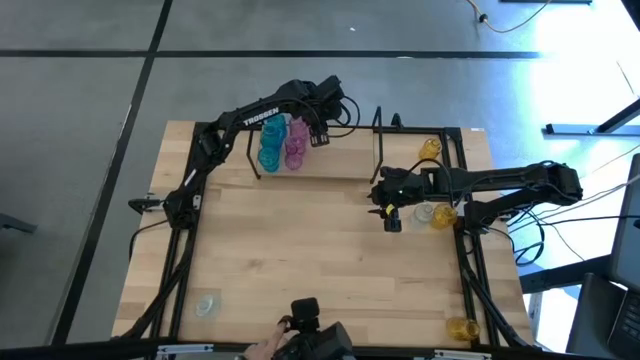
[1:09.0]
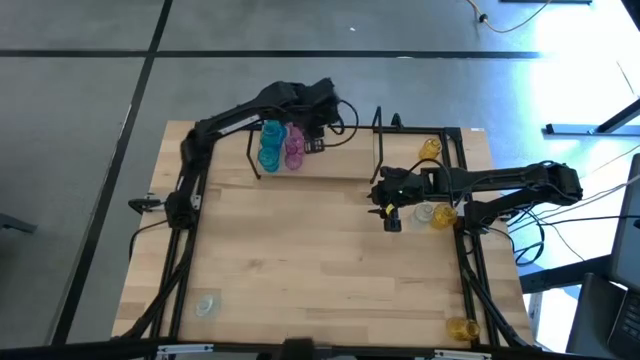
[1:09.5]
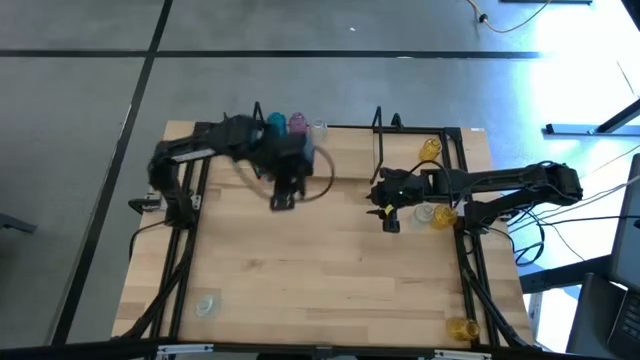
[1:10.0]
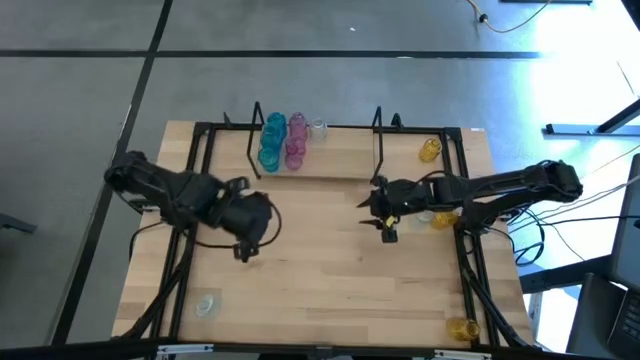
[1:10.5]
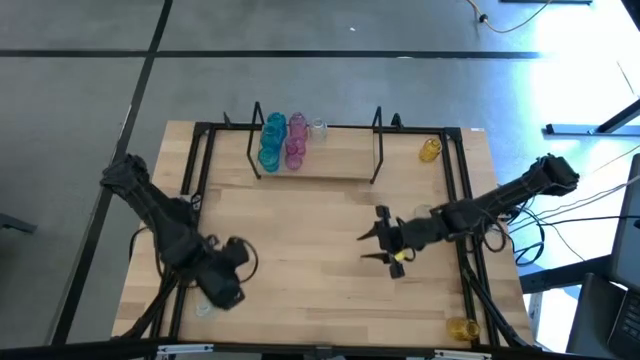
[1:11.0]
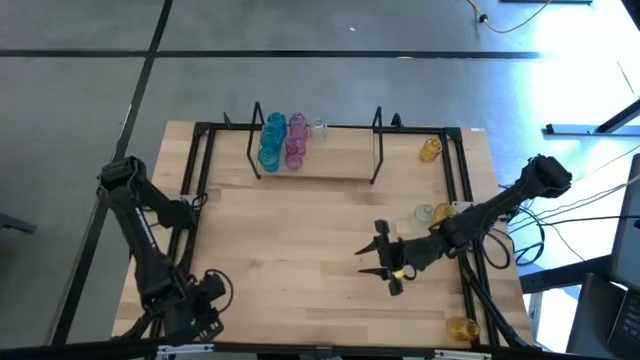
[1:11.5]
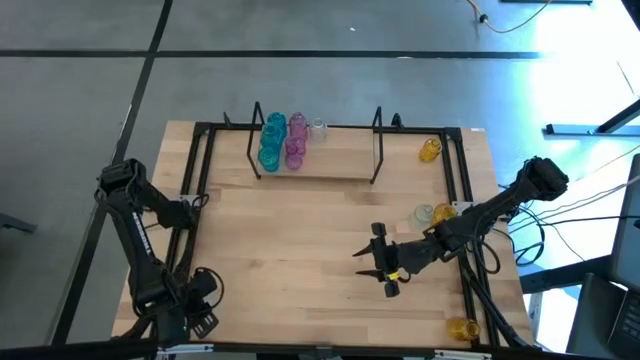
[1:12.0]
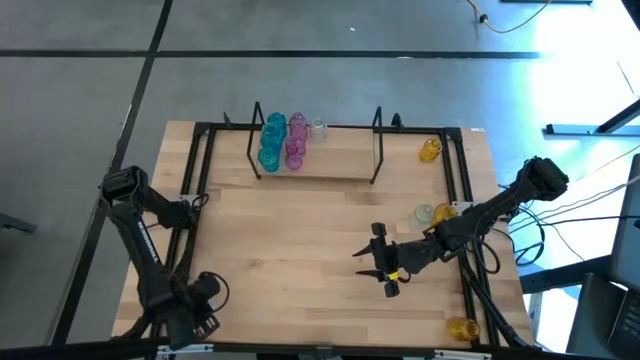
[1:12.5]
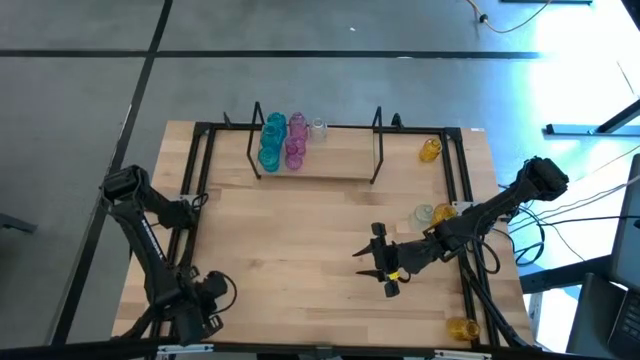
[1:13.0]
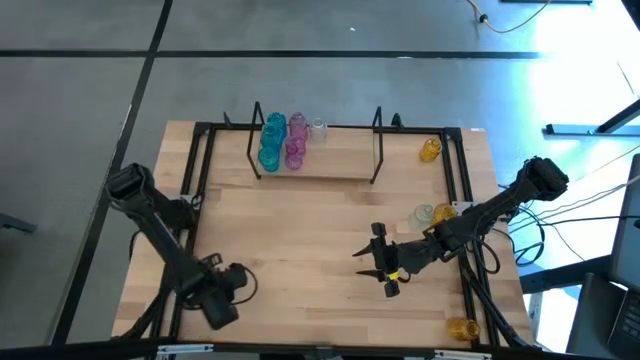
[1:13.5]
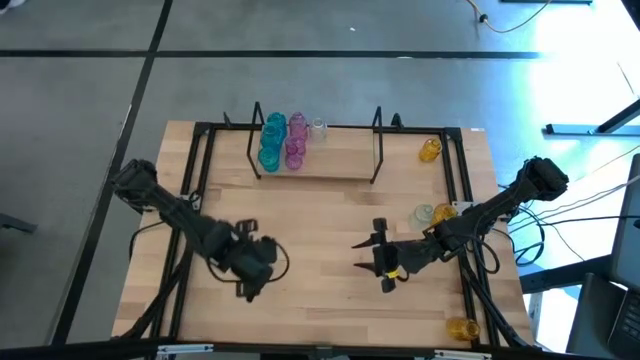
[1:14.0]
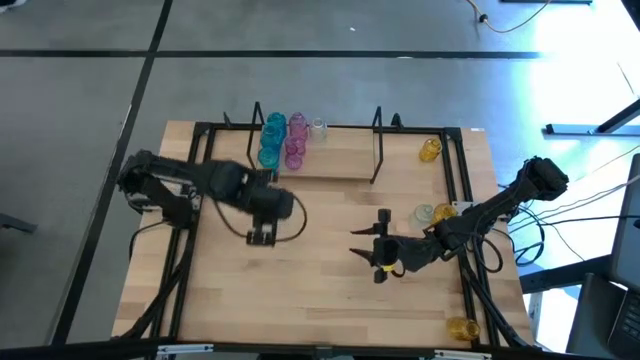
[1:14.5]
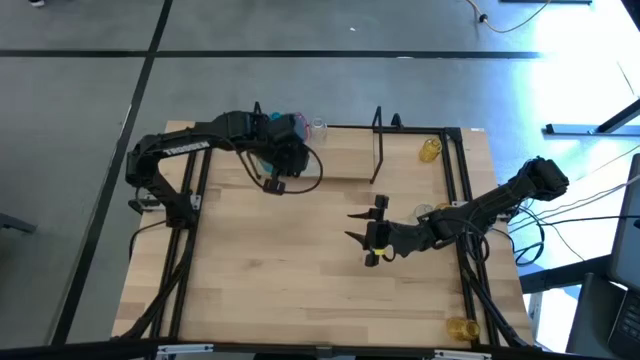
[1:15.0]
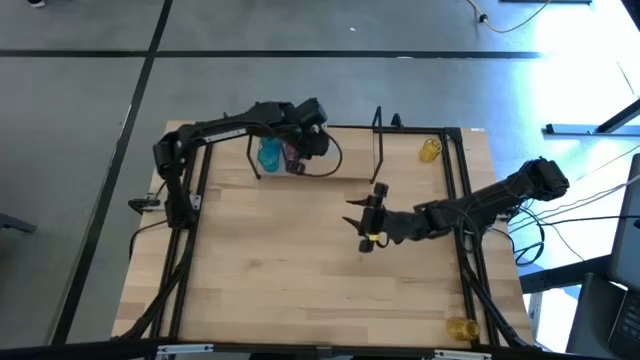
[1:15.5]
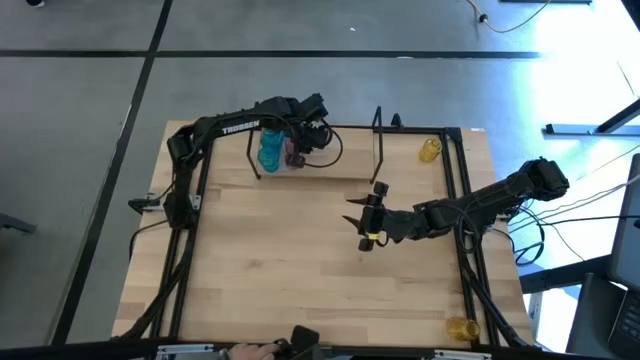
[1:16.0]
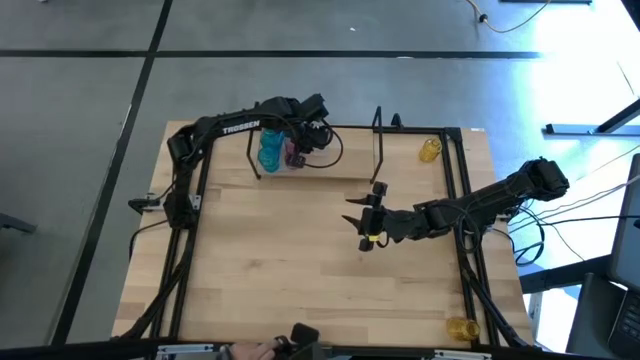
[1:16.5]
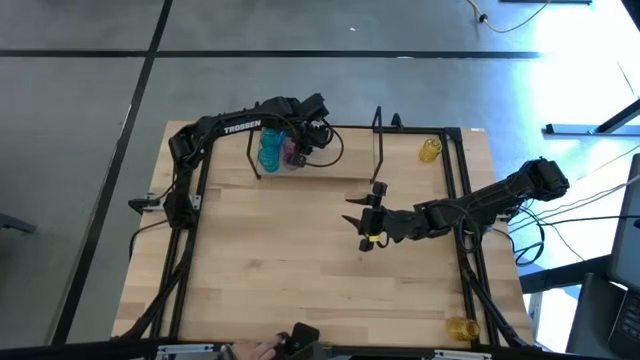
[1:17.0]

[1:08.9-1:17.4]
Task: sort vases onto shelf
Put the bottom transparent vase on the shelf aligned with the other transparent vase

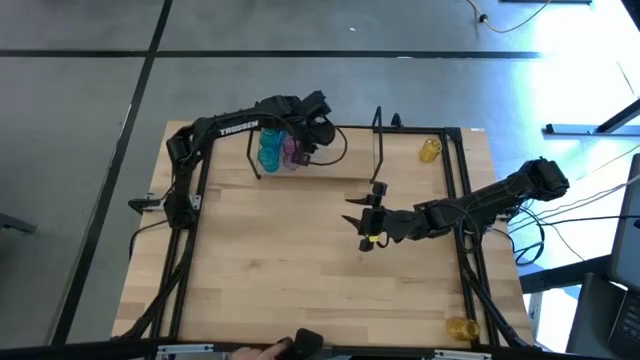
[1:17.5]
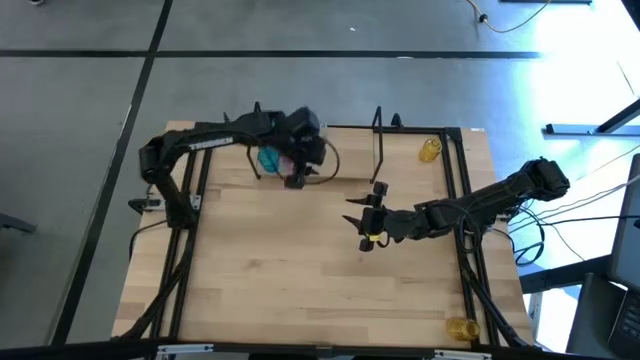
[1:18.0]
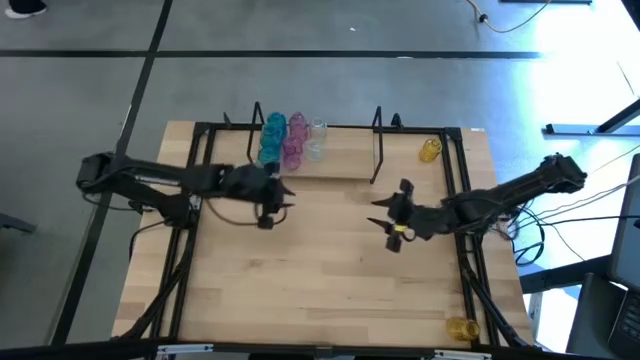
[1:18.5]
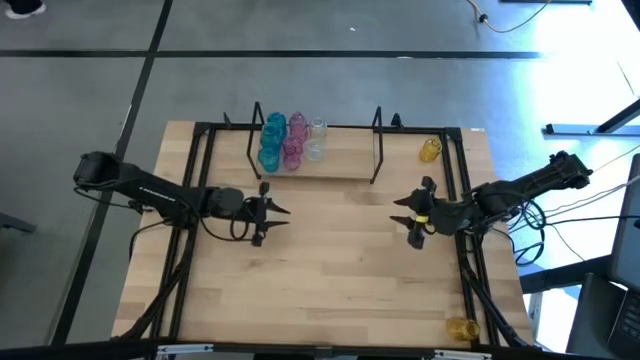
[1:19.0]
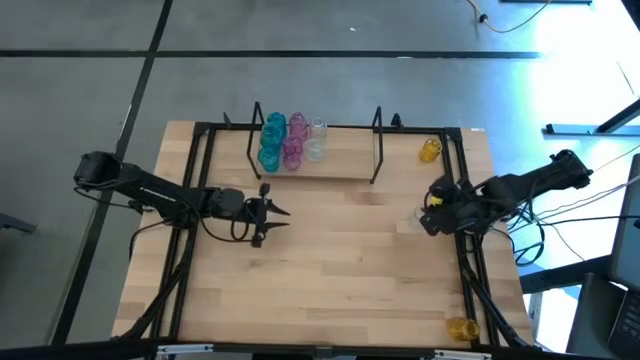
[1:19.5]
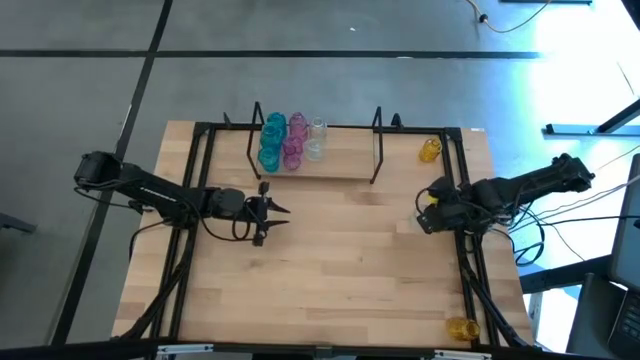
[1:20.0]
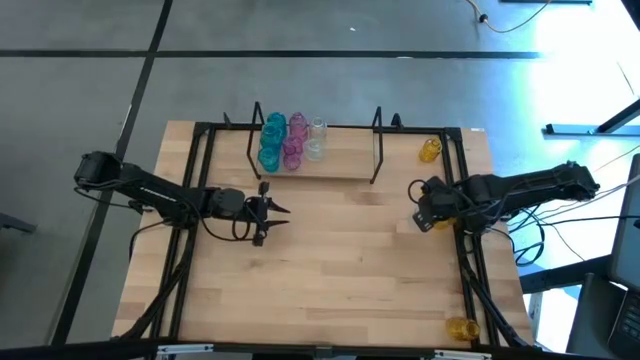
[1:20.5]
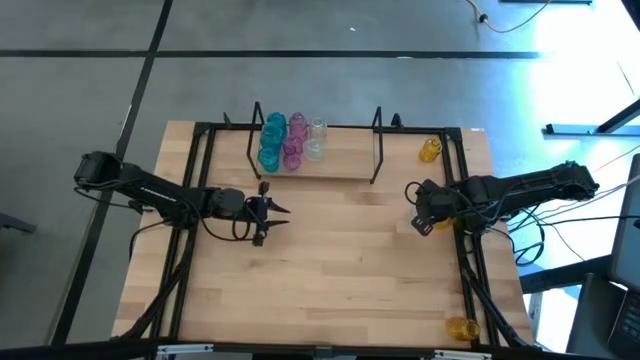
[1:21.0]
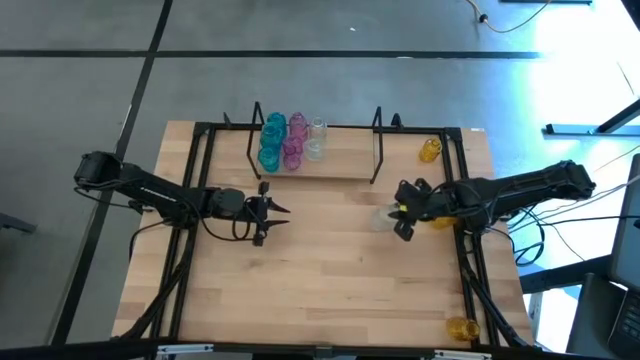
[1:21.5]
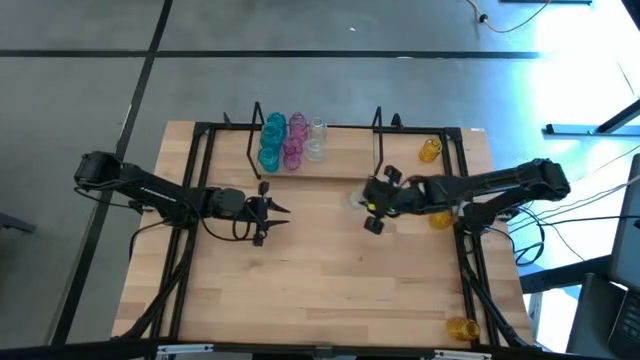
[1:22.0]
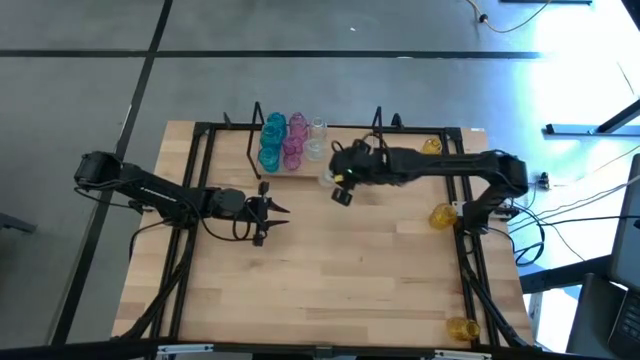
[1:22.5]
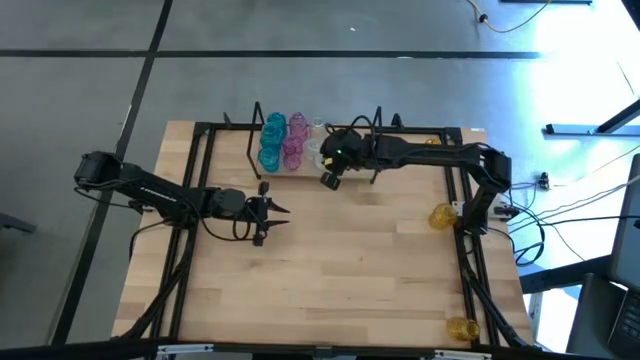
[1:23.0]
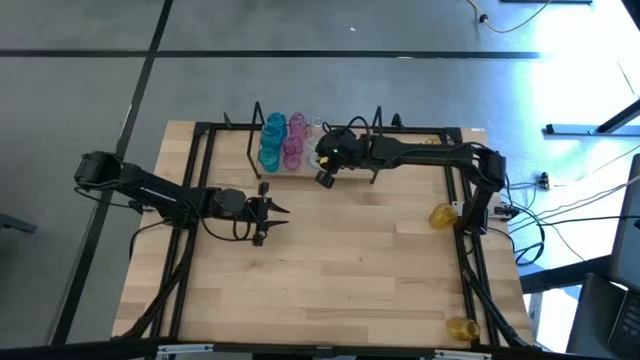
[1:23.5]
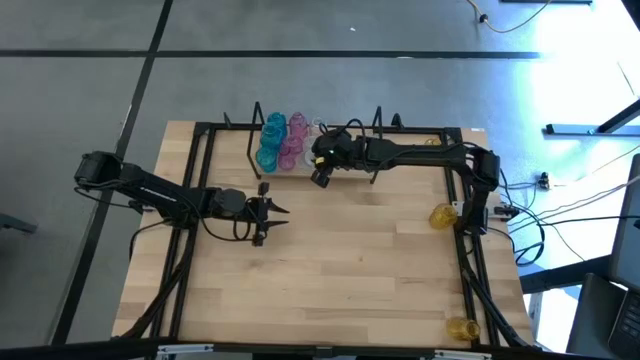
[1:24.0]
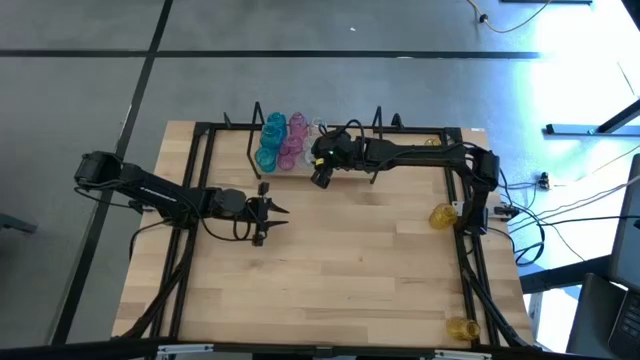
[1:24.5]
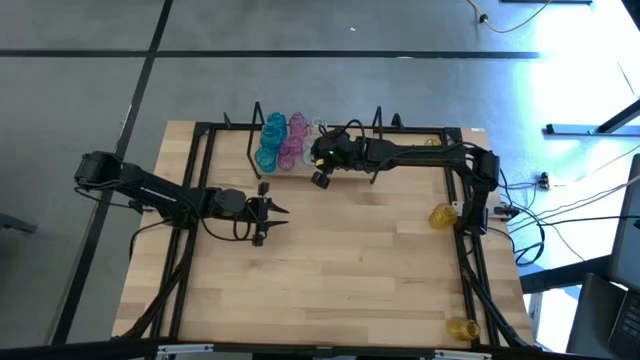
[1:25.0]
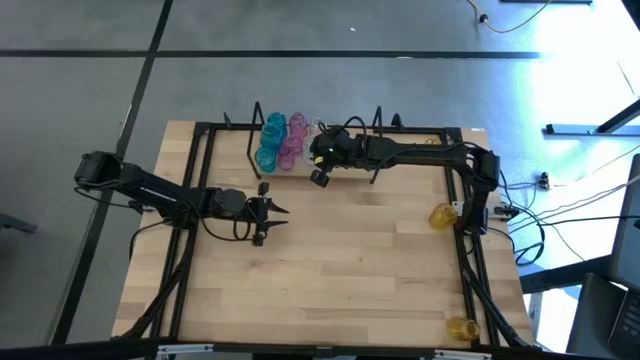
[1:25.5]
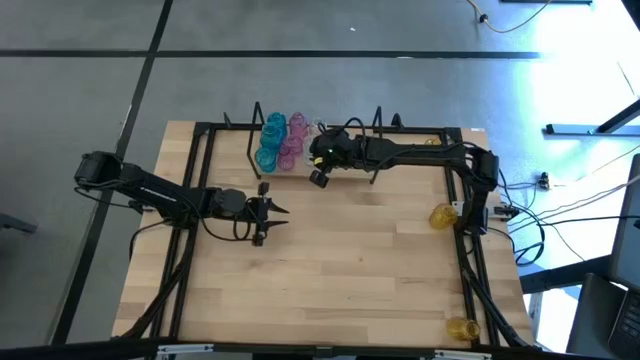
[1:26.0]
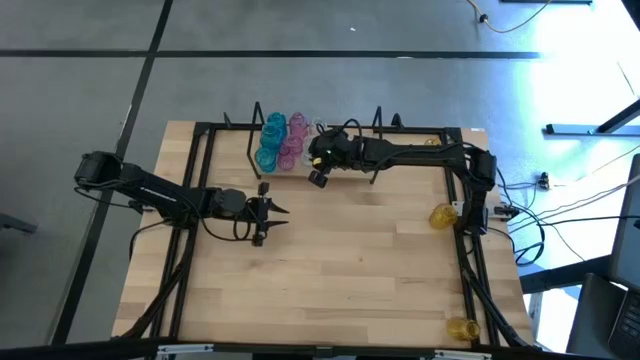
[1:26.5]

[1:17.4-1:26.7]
Put the transparent vase on the shelf aligned with the other transparent vases

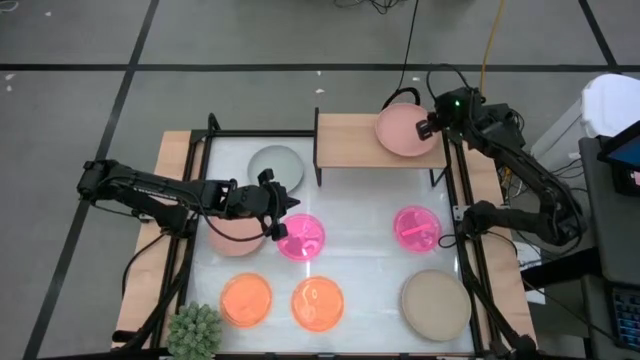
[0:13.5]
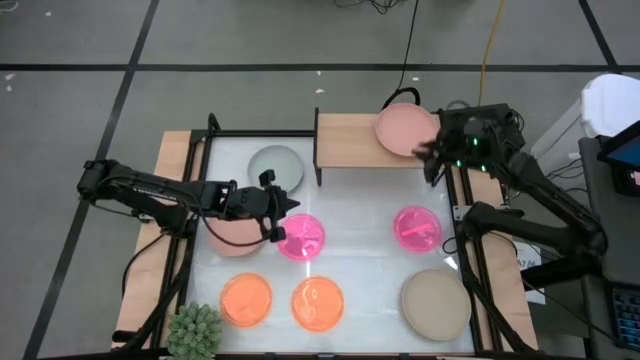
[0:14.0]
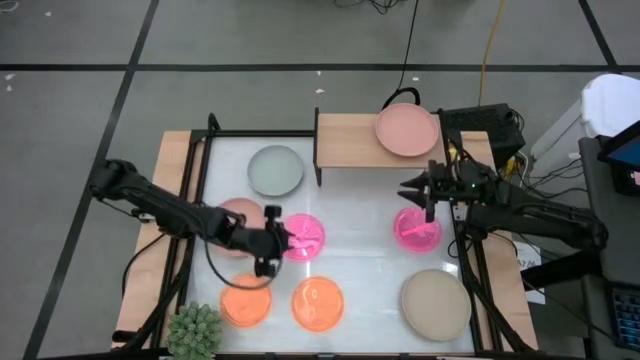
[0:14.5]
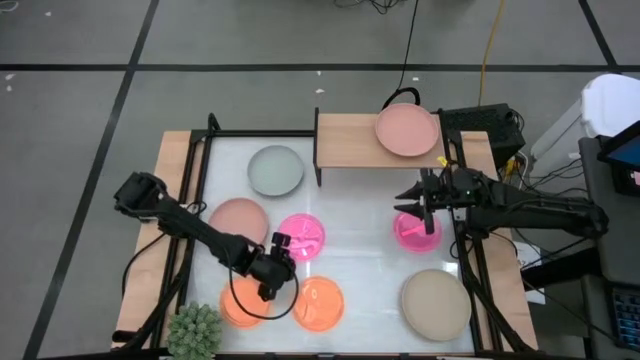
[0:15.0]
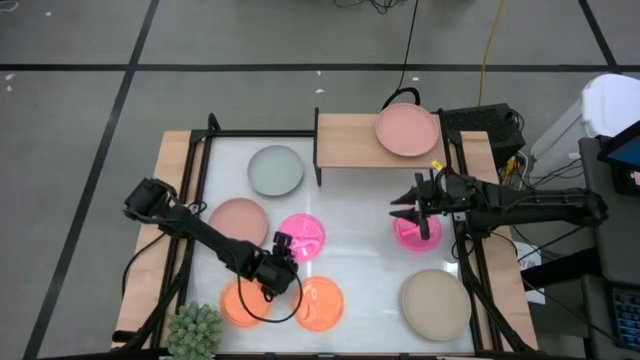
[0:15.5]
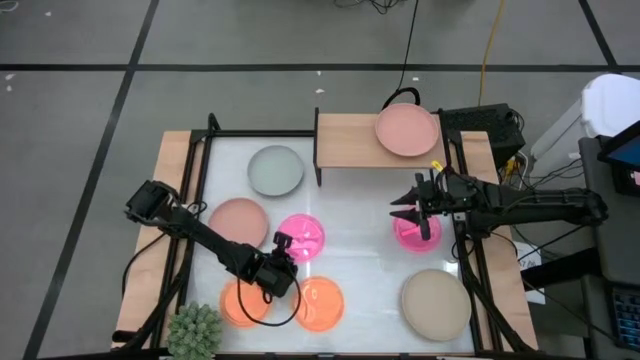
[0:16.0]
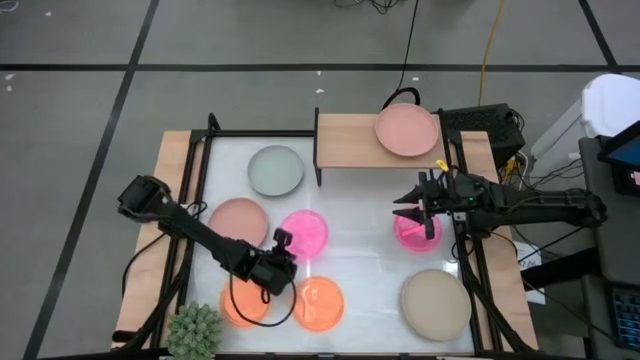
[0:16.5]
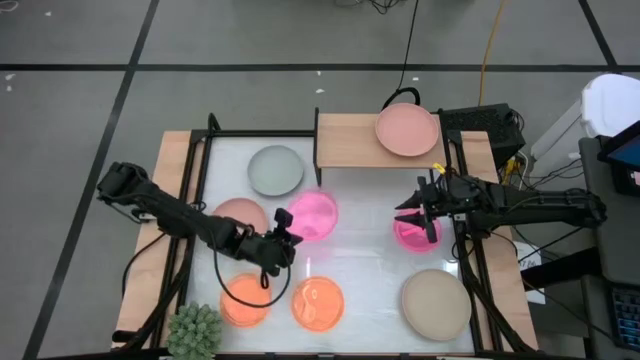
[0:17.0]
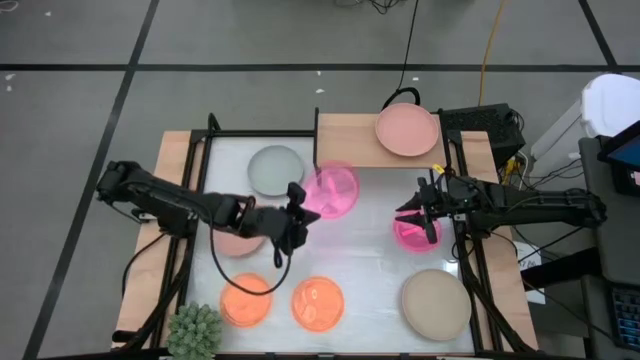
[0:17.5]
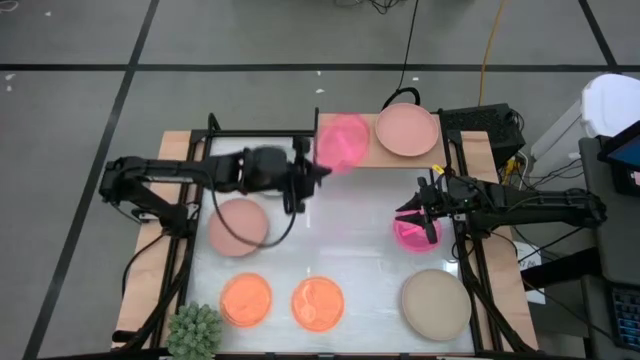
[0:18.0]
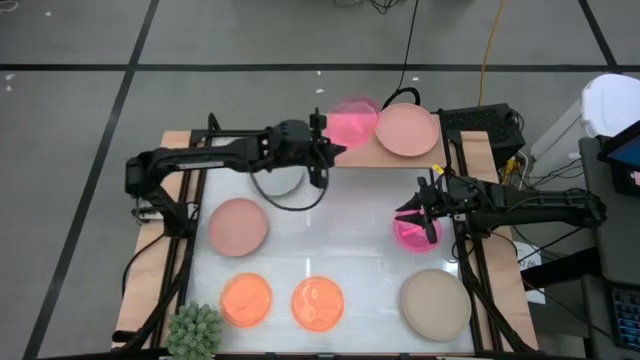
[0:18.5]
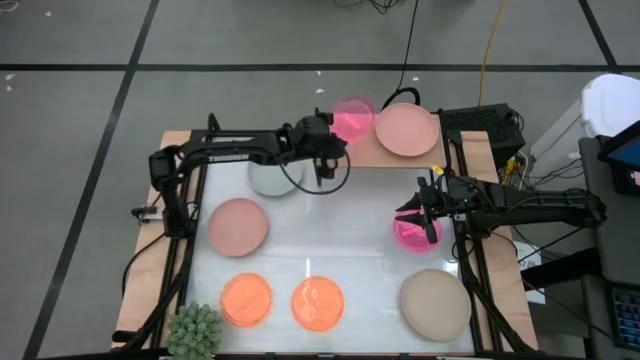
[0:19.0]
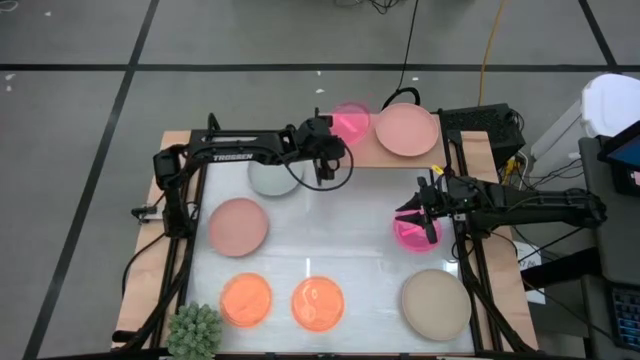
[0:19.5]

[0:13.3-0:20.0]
Task: Place and stack plates onto a shelf
Put the left light pink plate on the shelf
